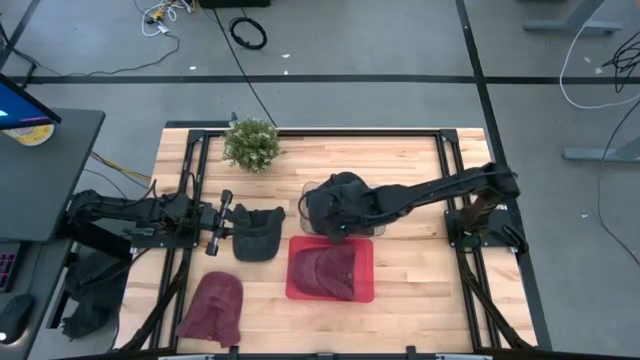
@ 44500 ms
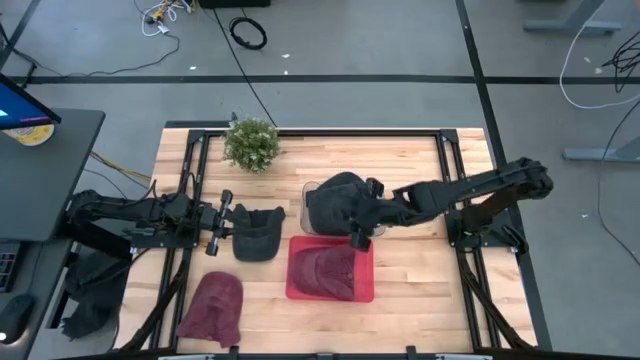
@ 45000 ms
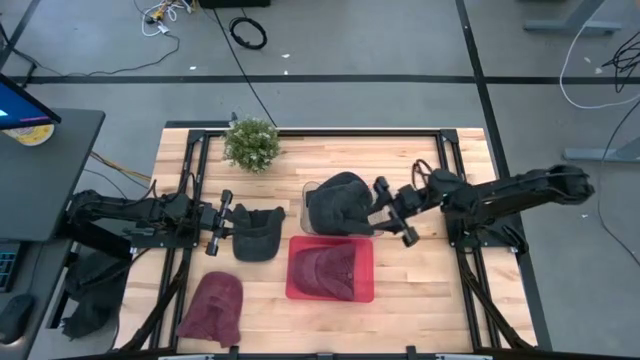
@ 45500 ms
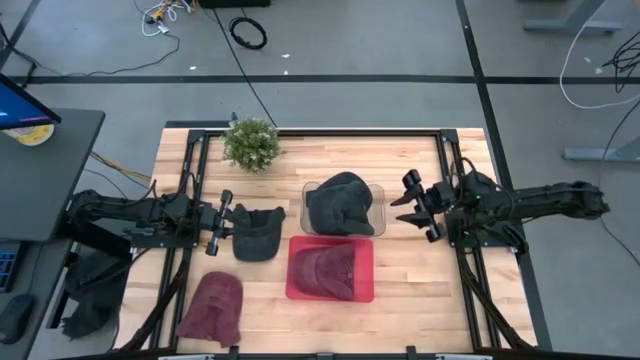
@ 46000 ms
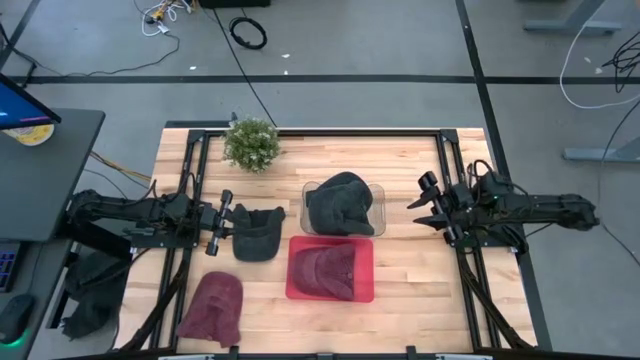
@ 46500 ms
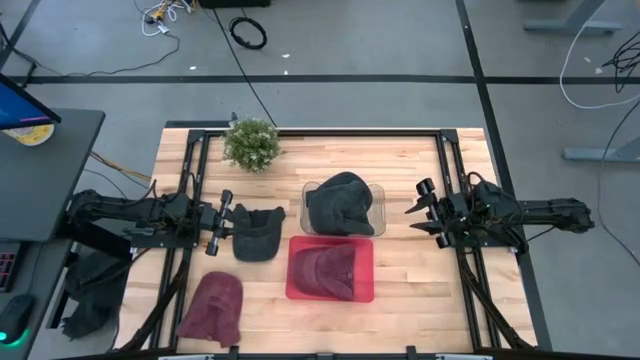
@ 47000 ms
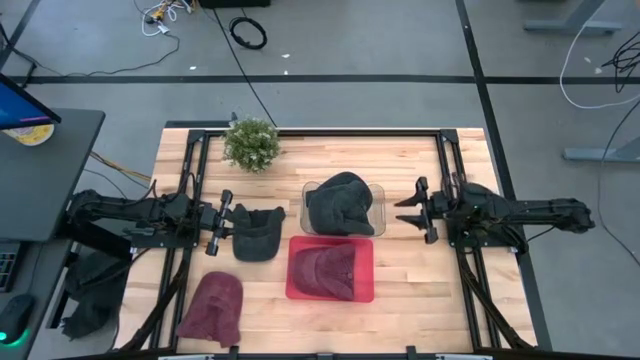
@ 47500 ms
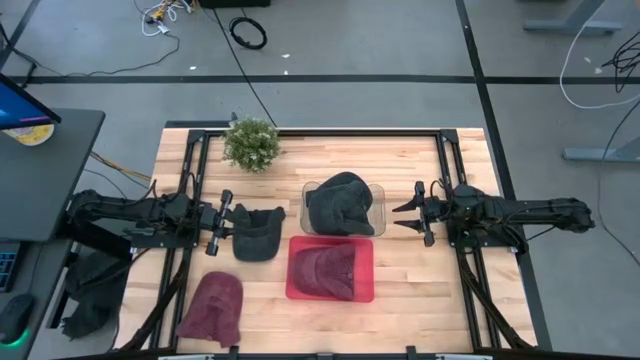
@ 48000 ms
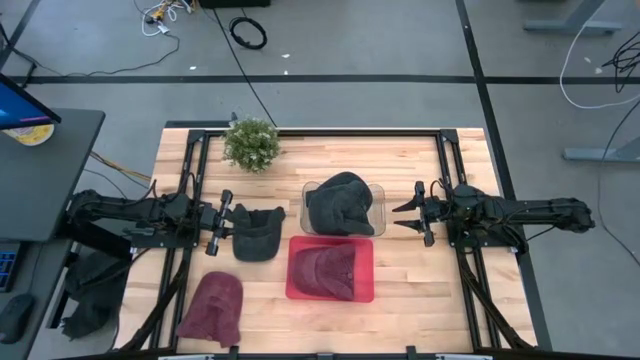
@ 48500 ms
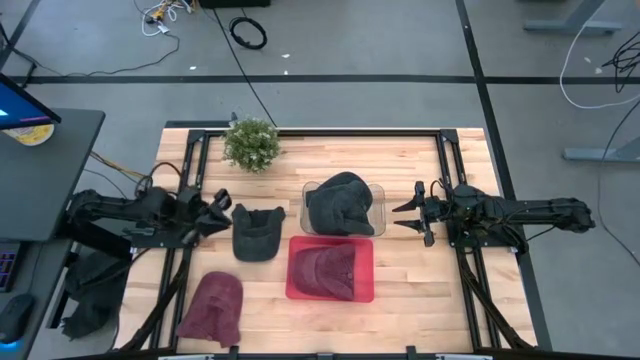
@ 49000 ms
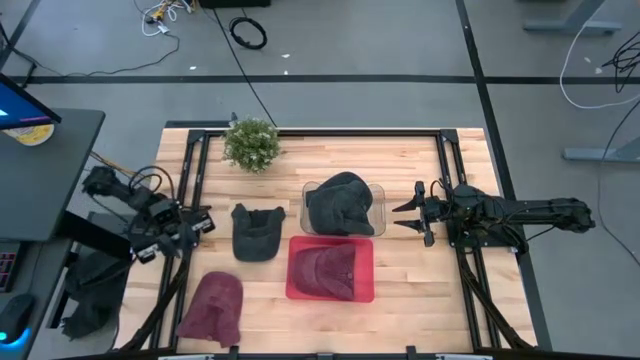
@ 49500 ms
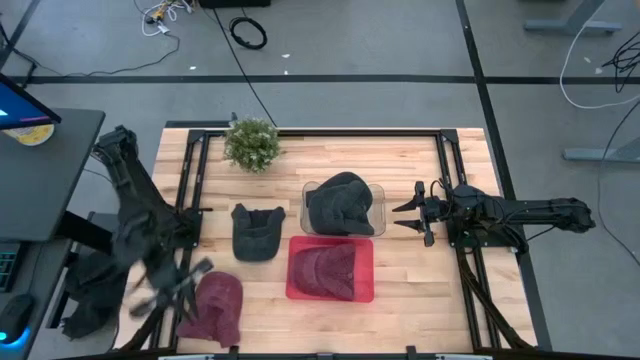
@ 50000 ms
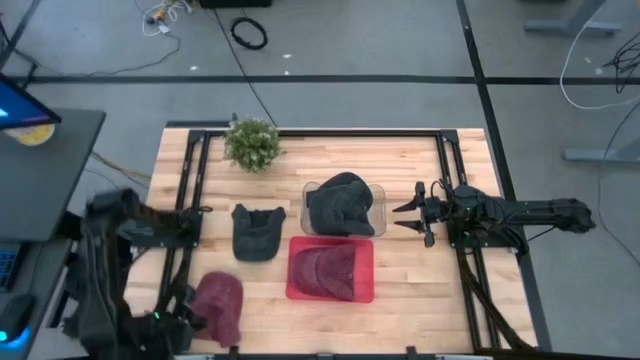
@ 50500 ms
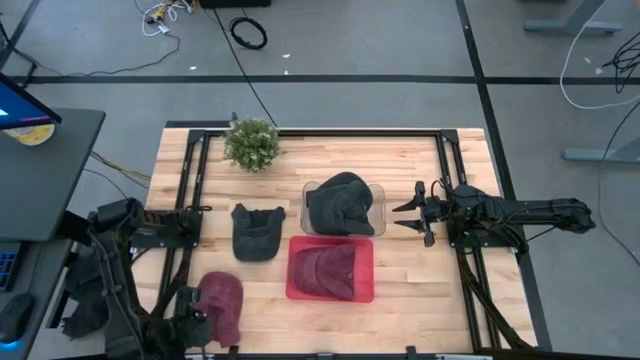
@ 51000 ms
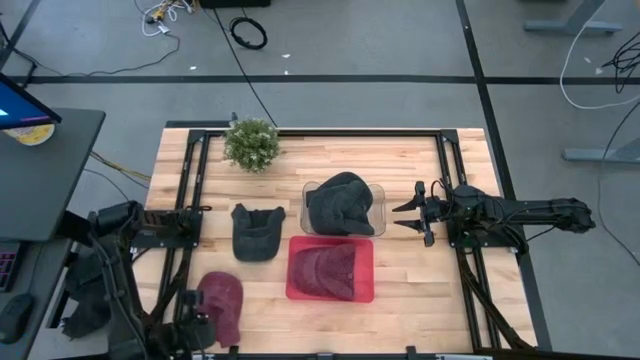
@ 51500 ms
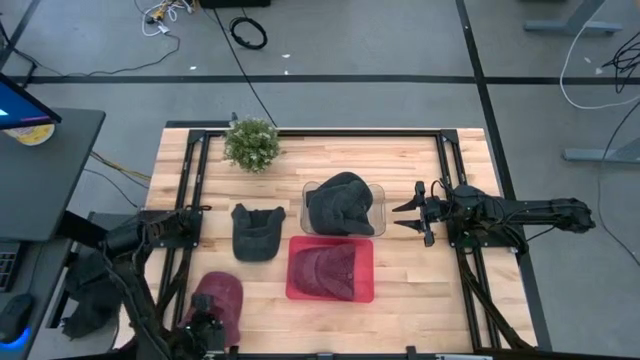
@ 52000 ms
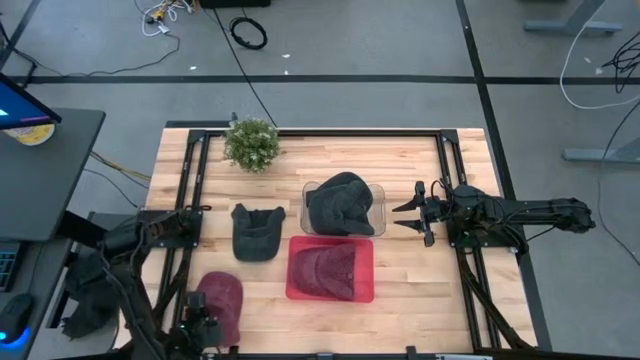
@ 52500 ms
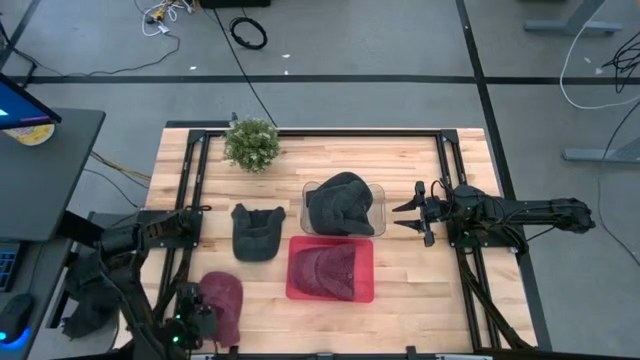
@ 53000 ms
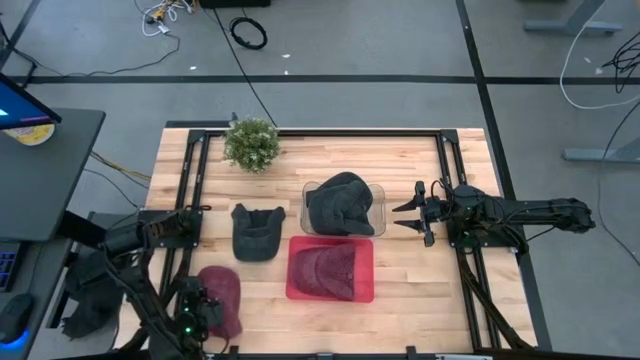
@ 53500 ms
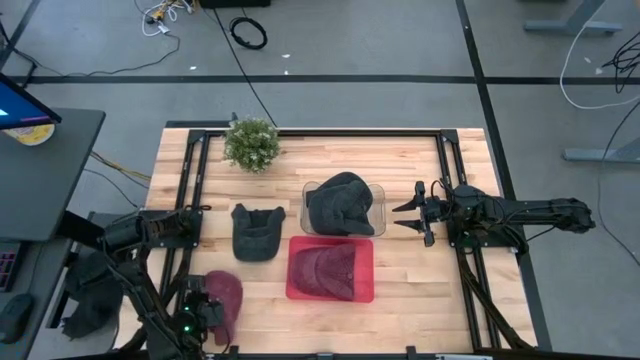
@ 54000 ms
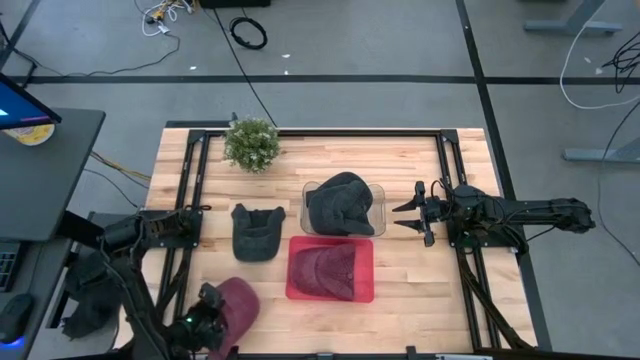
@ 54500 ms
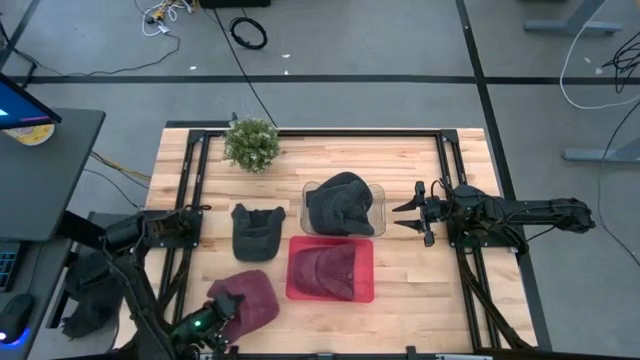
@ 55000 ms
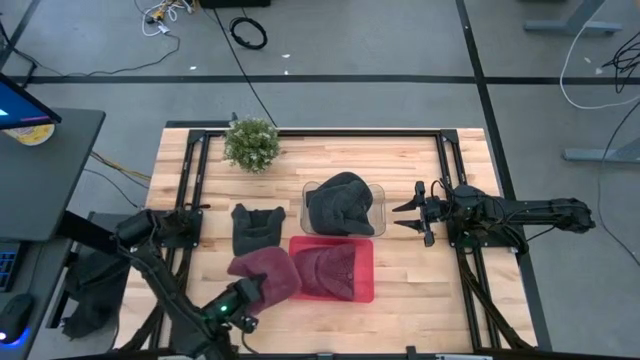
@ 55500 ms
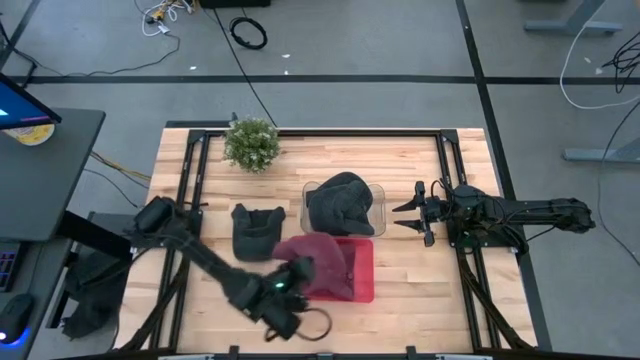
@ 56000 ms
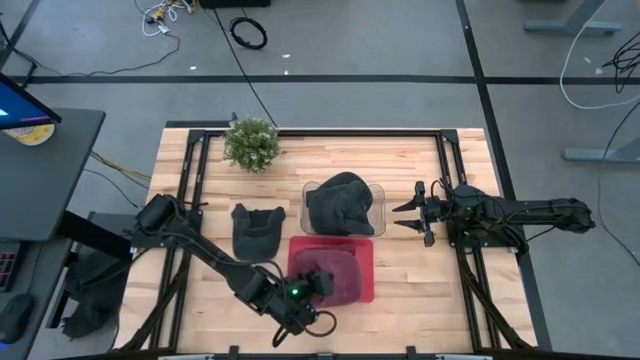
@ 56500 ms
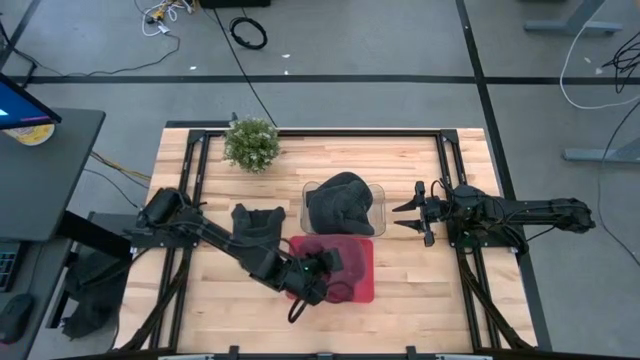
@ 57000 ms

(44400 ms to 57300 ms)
Task: Pick & Place hat
Put the red cap into the pink bin

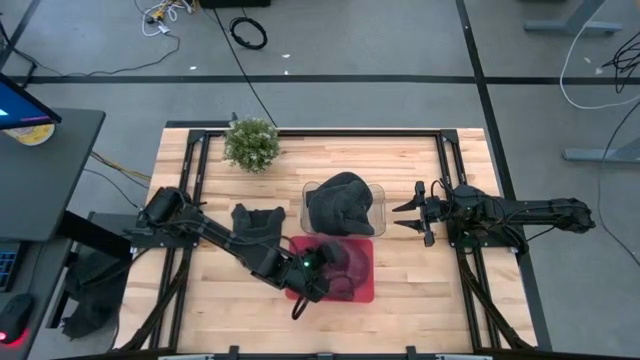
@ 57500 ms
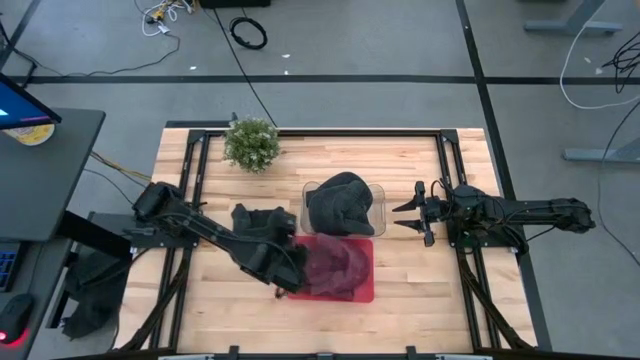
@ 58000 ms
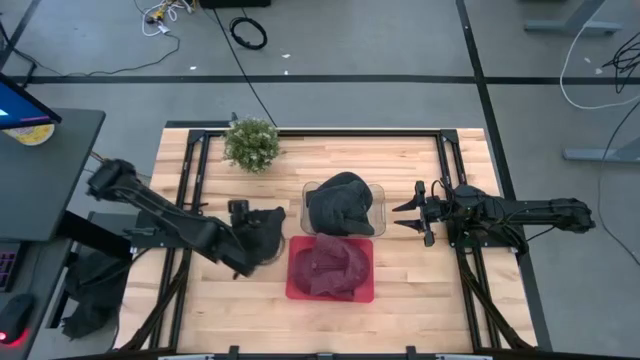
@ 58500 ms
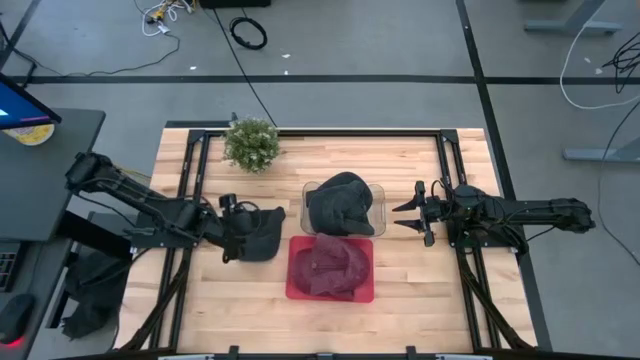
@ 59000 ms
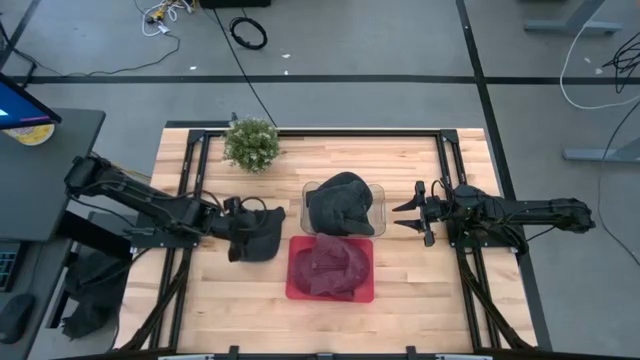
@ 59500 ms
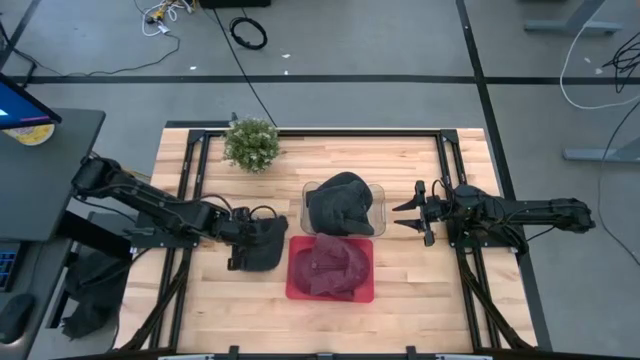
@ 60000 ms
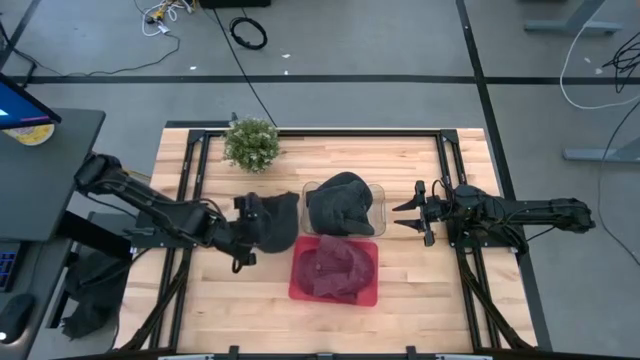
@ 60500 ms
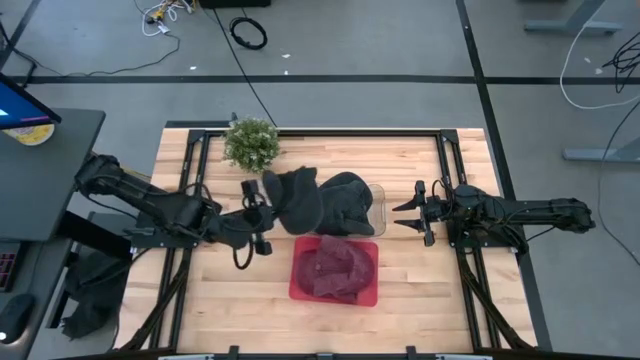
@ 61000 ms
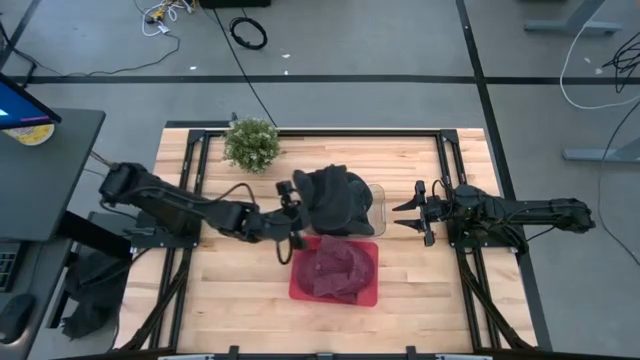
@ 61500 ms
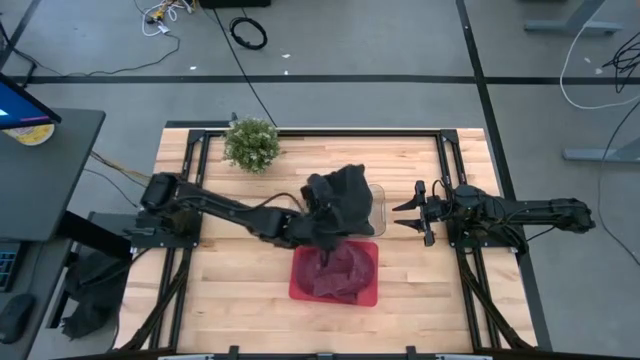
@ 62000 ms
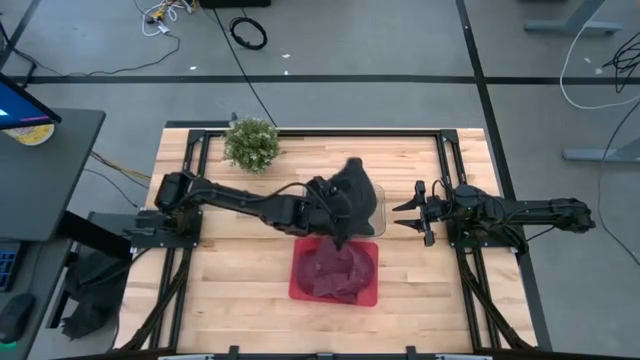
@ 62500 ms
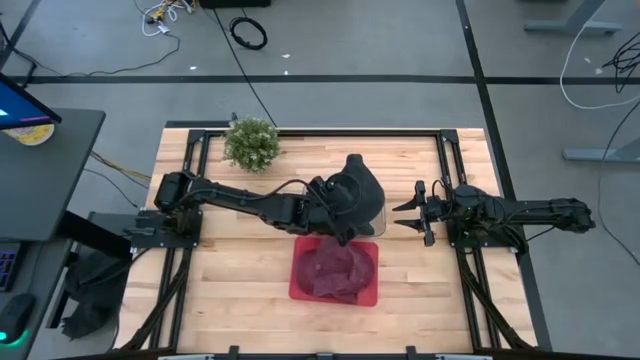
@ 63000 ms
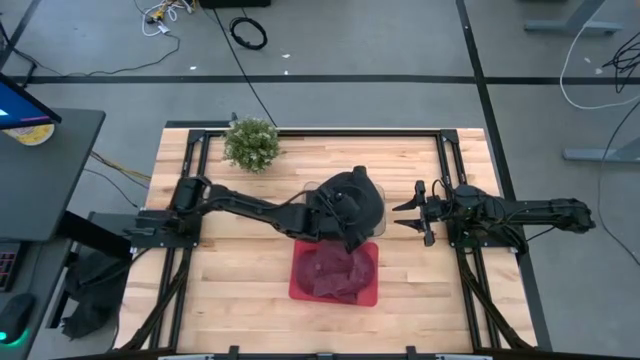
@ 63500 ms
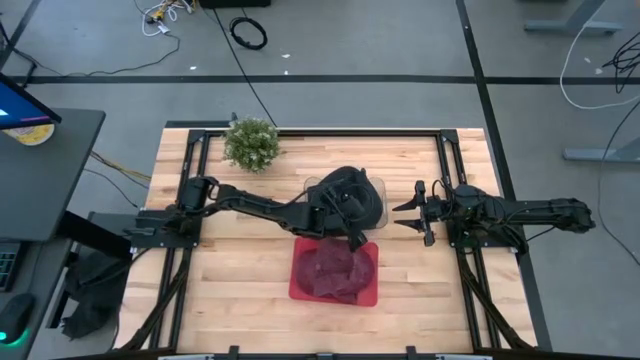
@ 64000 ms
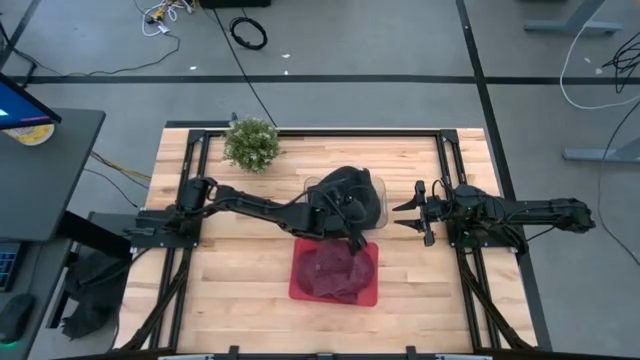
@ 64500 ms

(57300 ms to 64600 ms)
Put the black cap into the transparent bin
